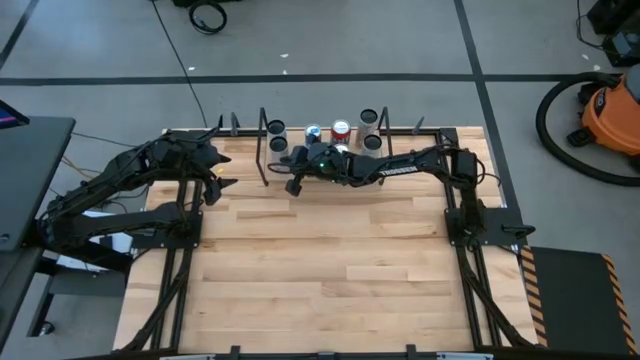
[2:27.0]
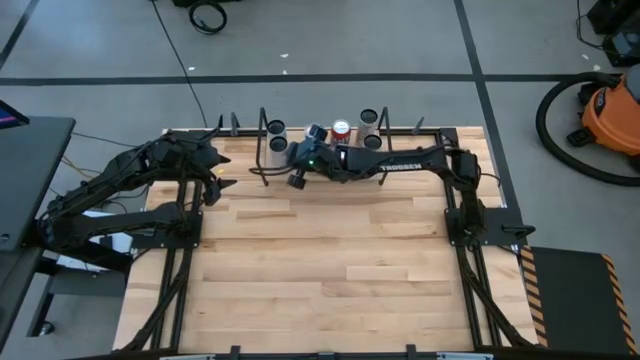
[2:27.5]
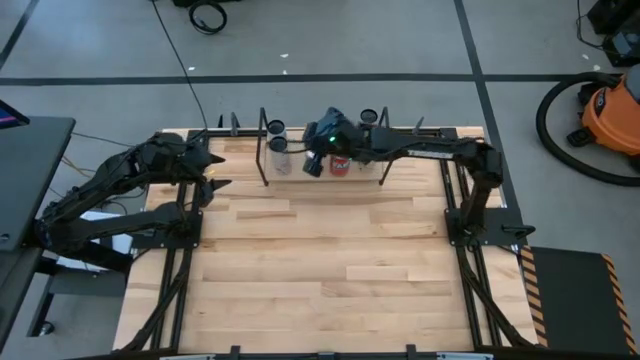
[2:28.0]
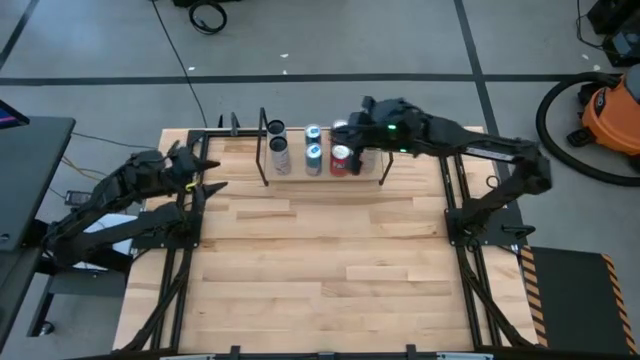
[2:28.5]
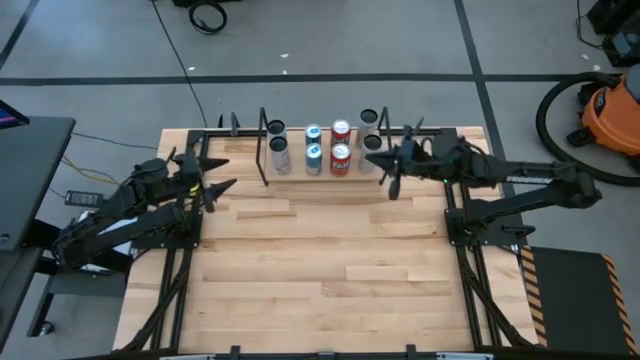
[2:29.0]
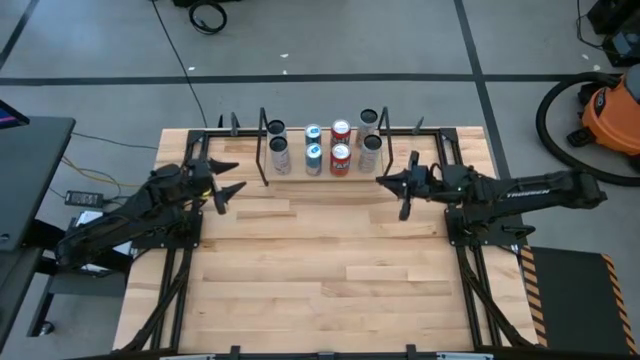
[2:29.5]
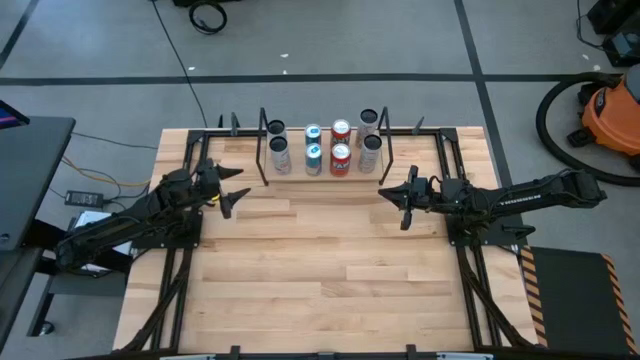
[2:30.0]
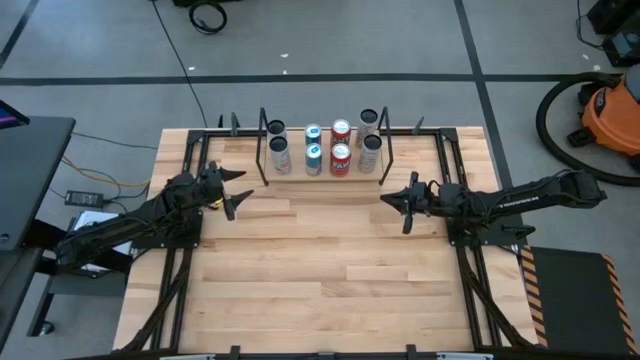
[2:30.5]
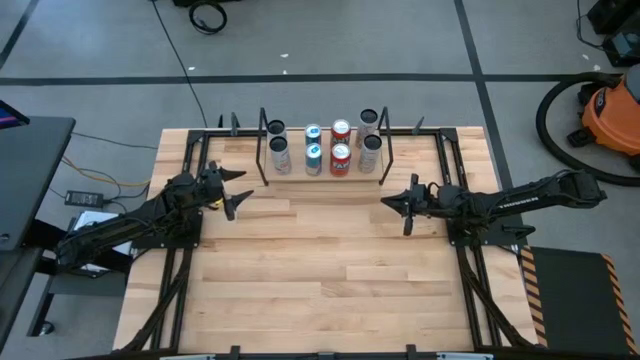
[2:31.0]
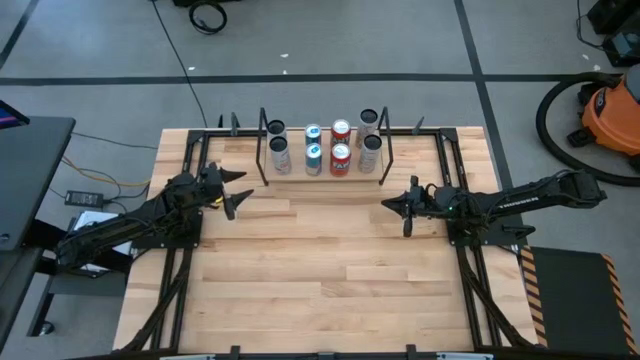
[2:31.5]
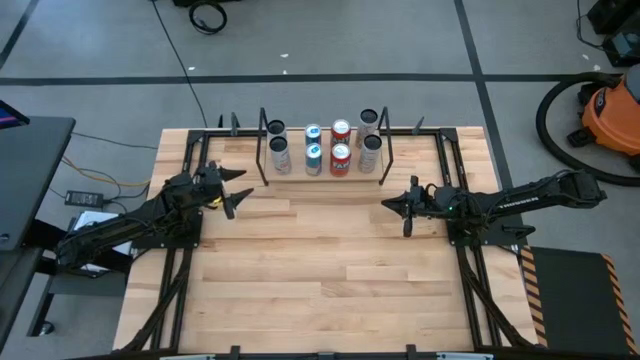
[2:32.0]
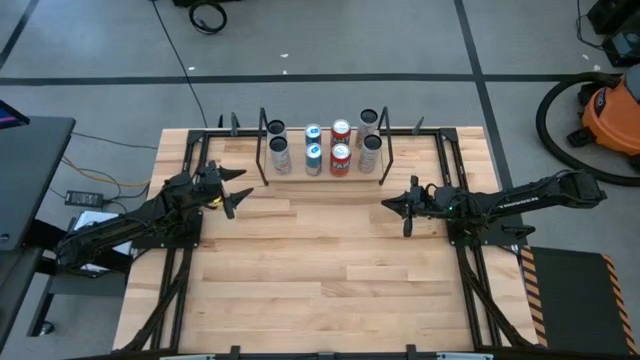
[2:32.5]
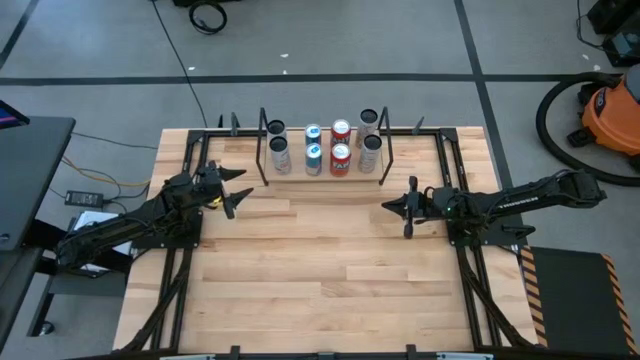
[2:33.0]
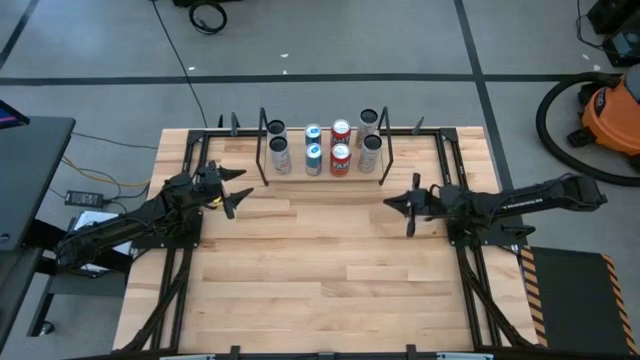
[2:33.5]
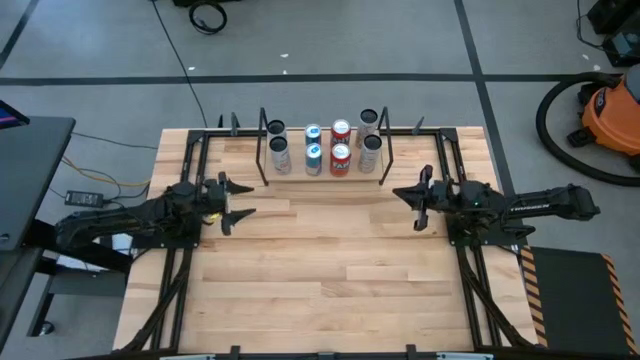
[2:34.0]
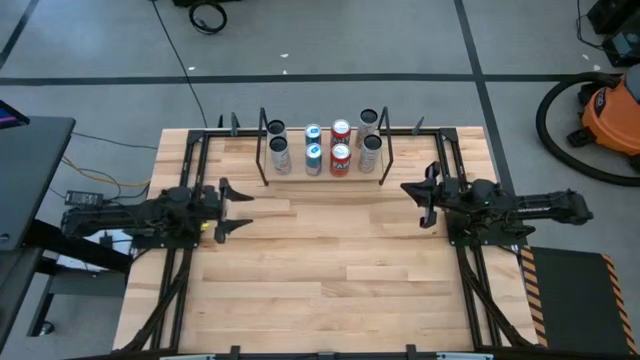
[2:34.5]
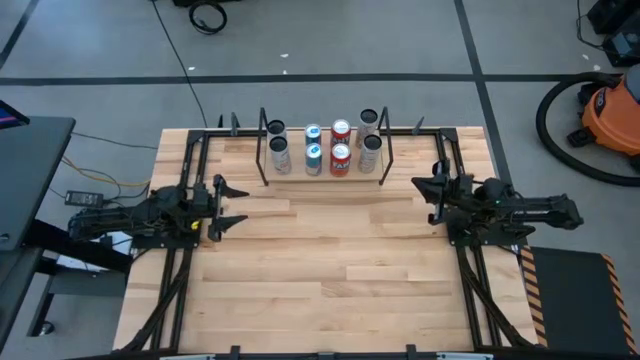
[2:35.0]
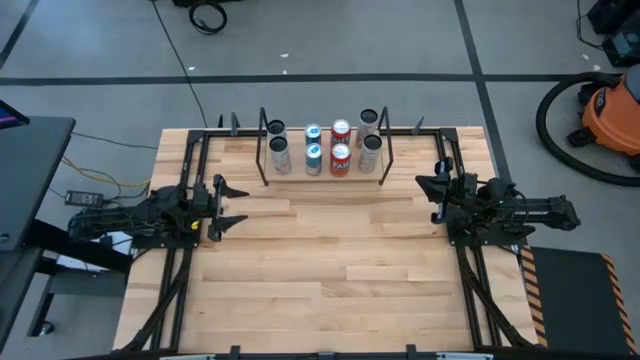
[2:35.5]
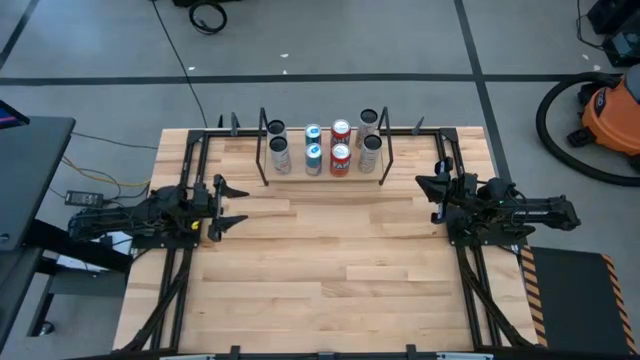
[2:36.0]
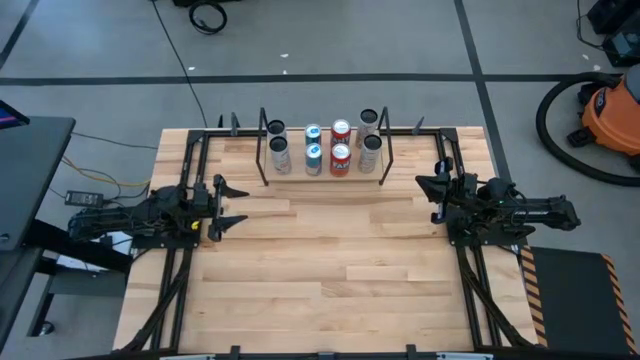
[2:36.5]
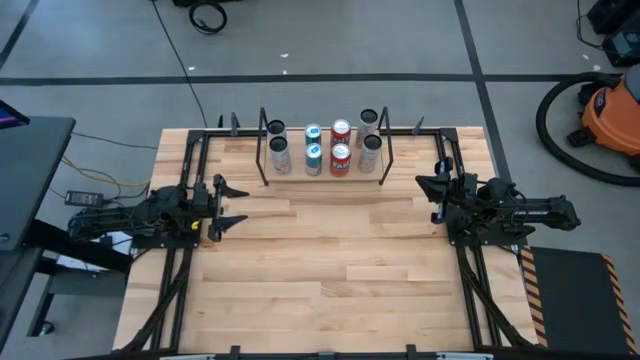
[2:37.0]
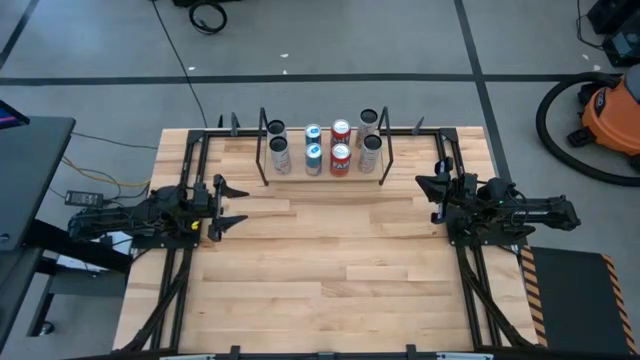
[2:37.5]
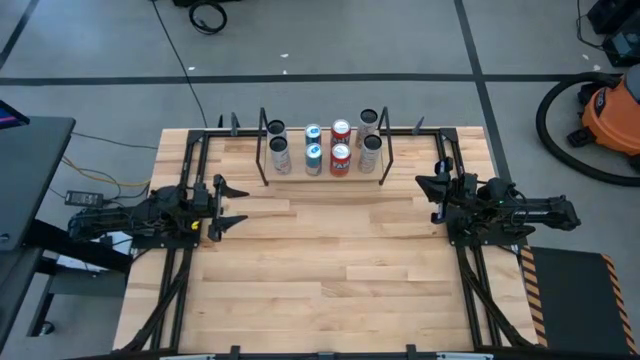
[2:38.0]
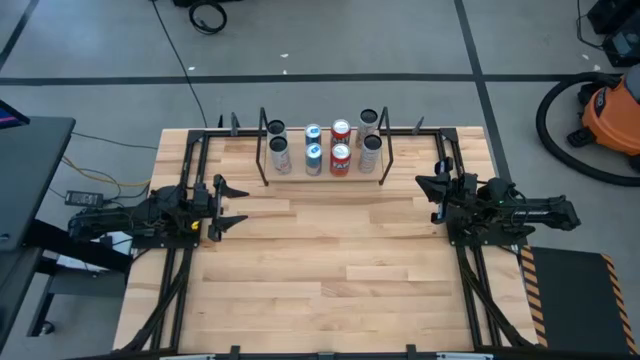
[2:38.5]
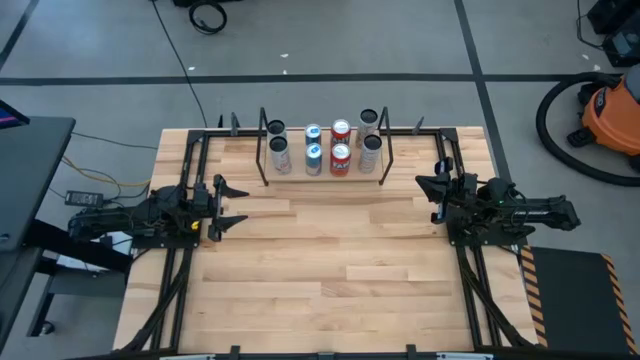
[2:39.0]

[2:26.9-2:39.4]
Task: Place canned beverage on shelf
Return to Home Position

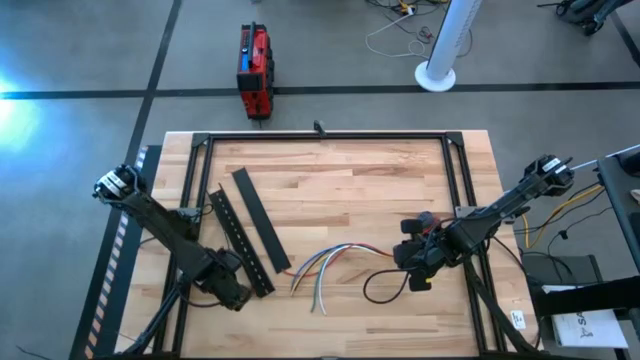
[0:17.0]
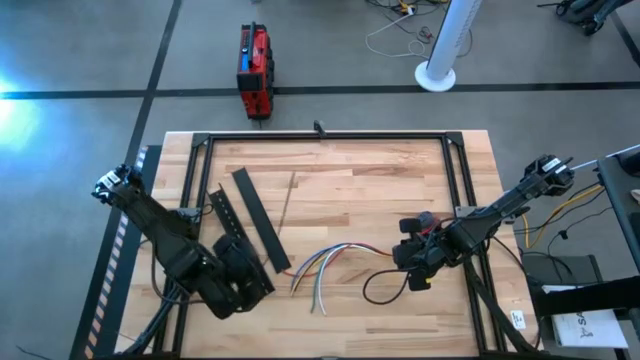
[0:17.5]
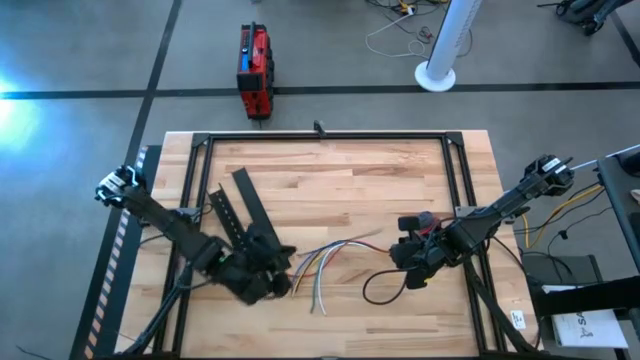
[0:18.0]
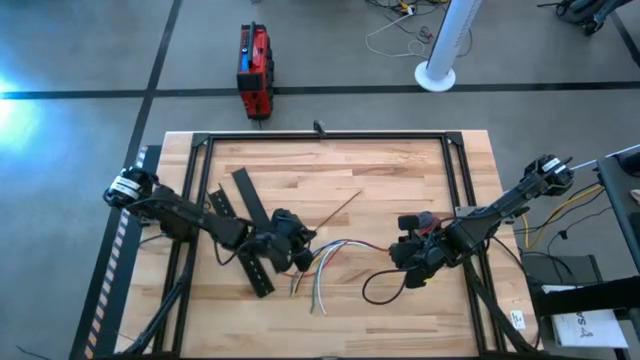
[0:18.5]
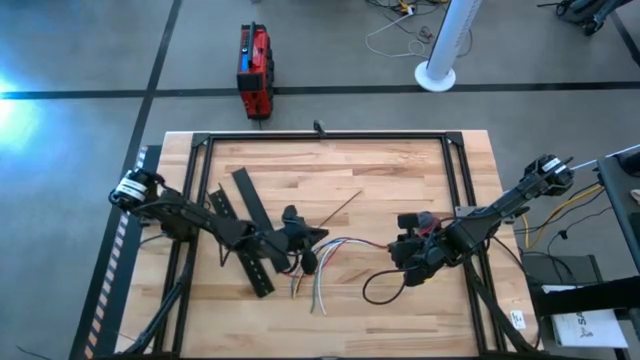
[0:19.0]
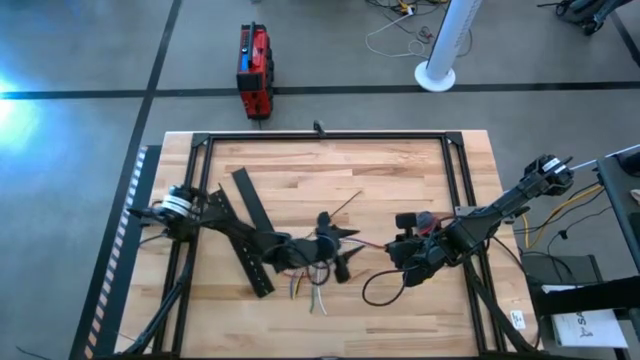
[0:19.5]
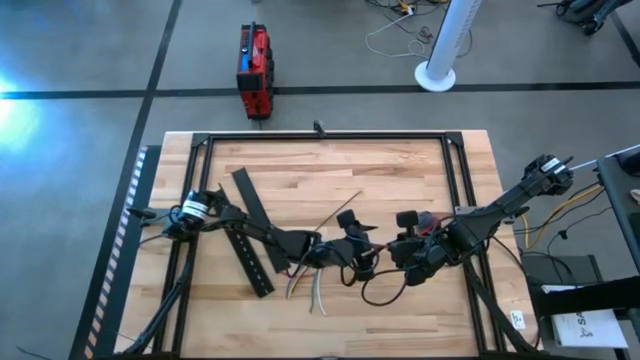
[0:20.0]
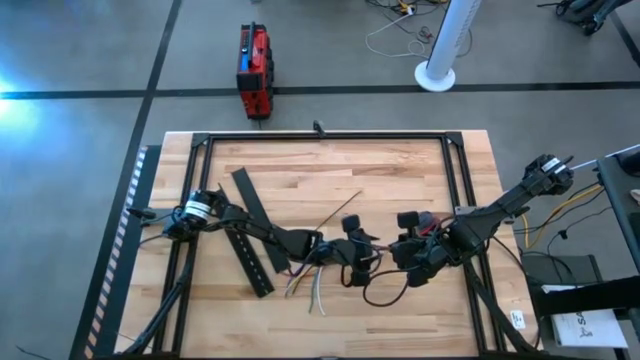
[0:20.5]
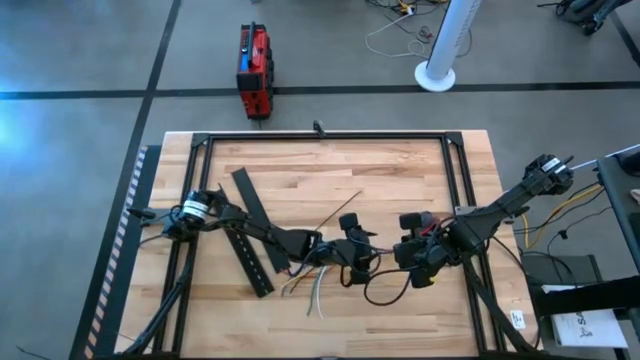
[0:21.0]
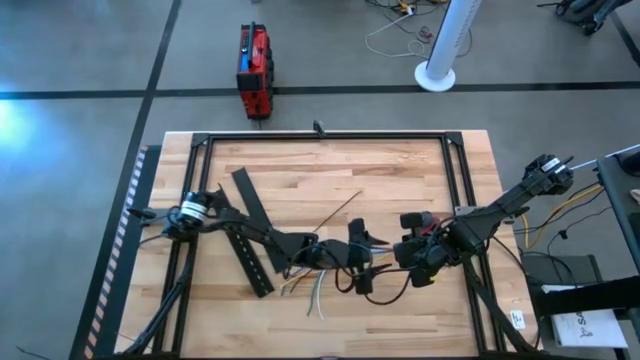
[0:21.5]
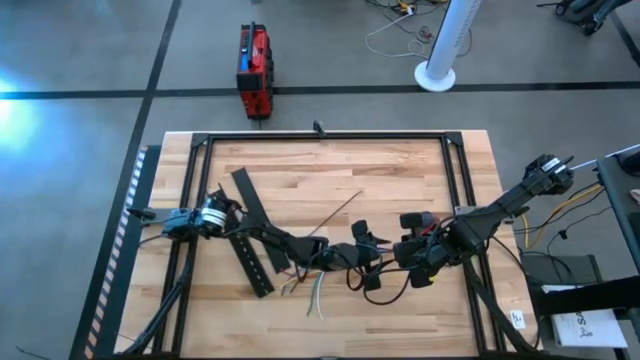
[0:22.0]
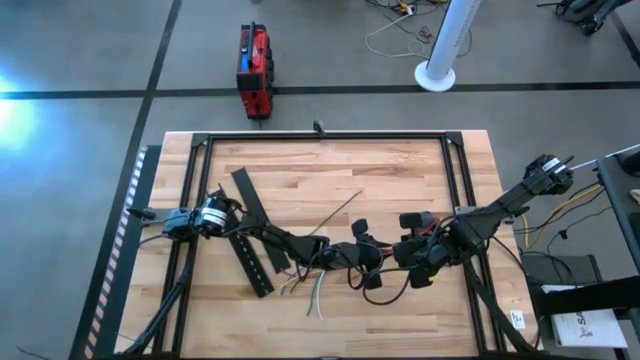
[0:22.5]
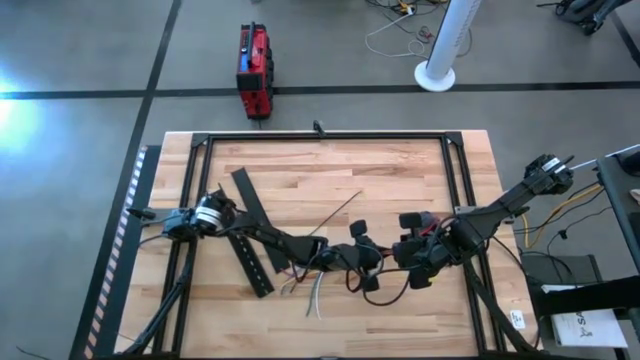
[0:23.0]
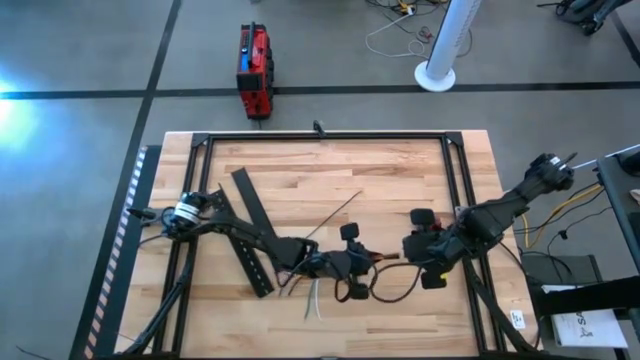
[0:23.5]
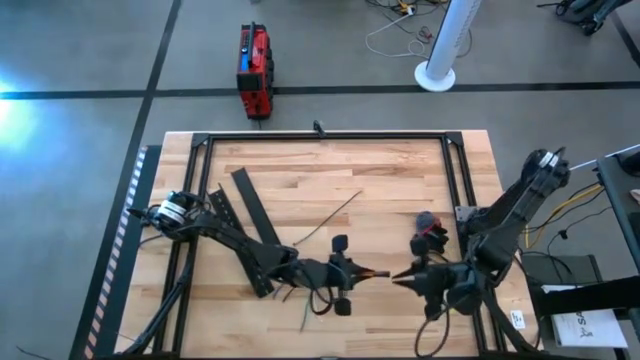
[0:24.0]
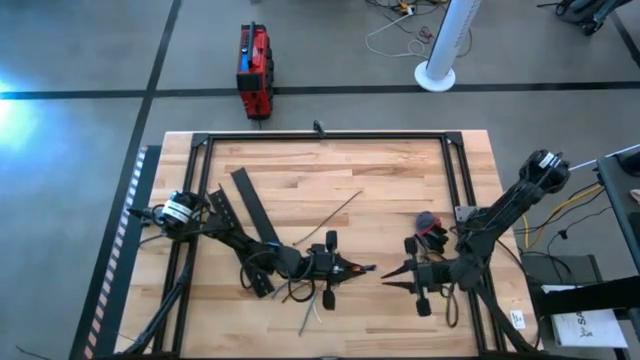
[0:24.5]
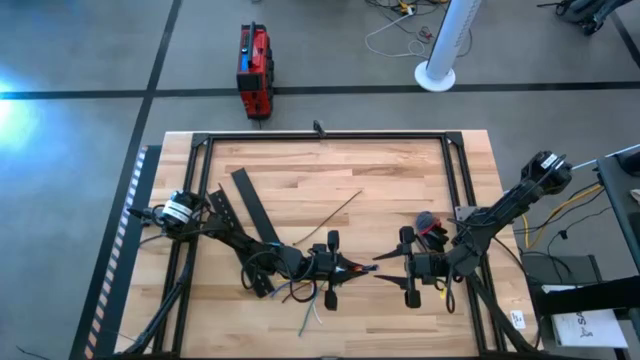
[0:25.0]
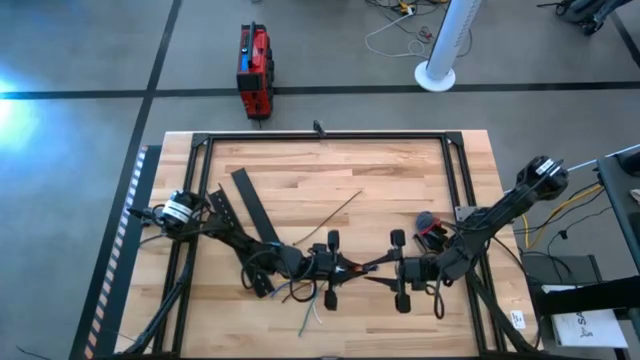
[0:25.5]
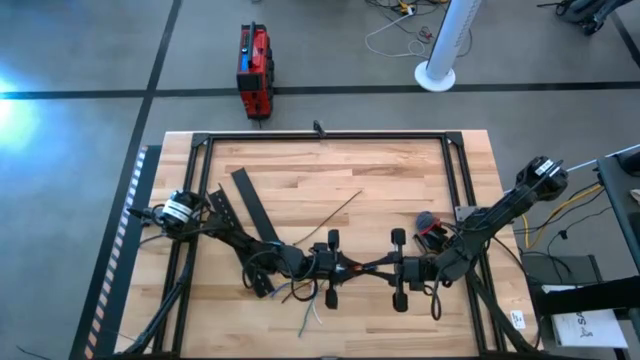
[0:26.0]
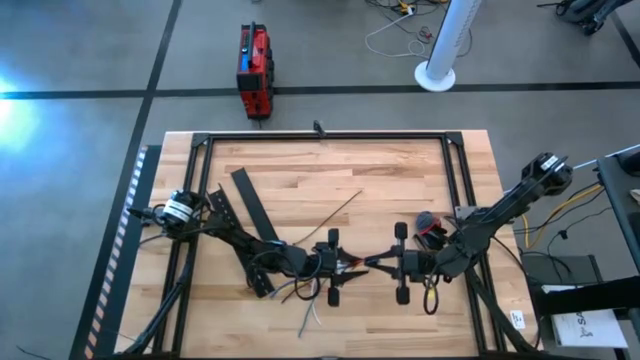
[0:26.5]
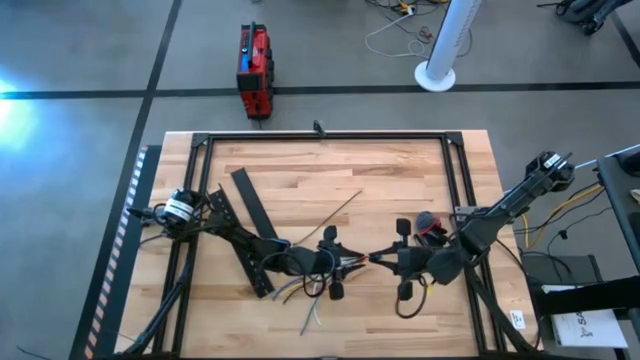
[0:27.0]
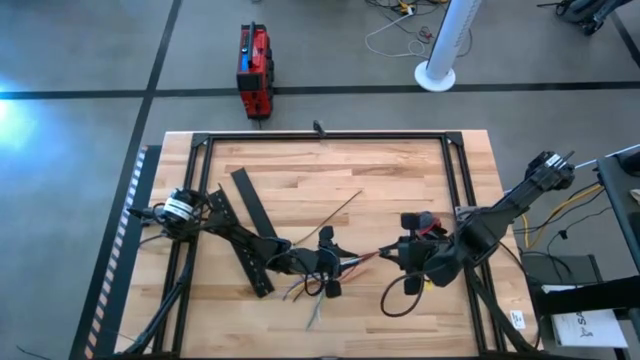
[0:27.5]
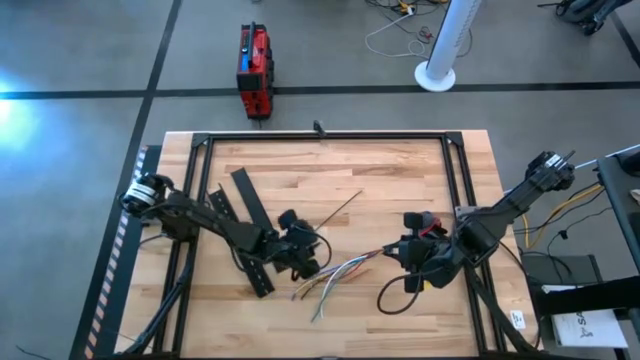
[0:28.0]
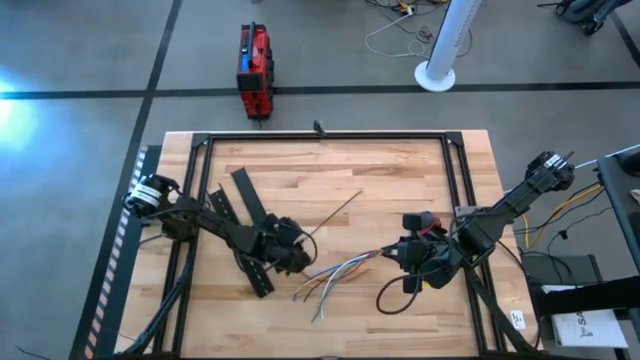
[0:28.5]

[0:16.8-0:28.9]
Task: Ziptie cables
Wrap the cable wires with the black zip tie
